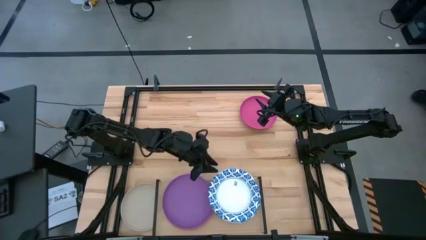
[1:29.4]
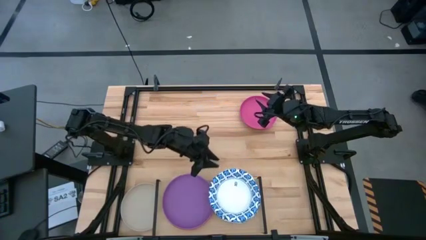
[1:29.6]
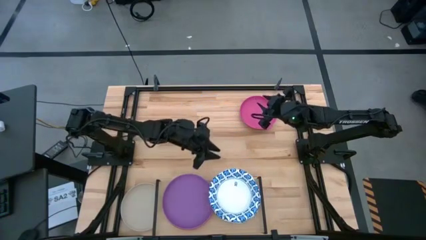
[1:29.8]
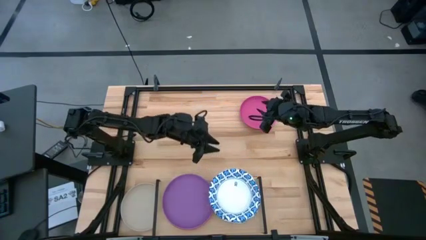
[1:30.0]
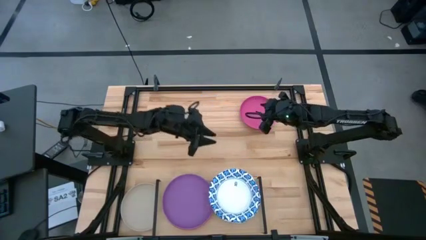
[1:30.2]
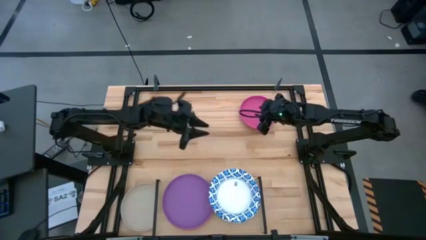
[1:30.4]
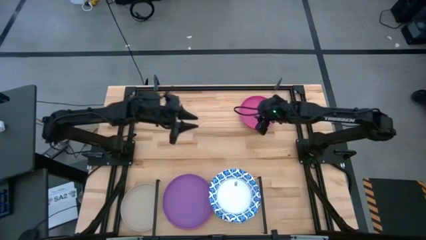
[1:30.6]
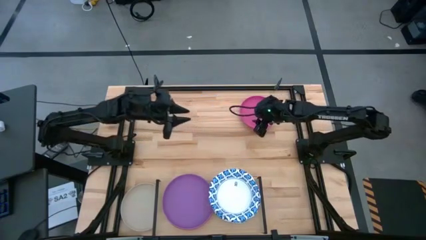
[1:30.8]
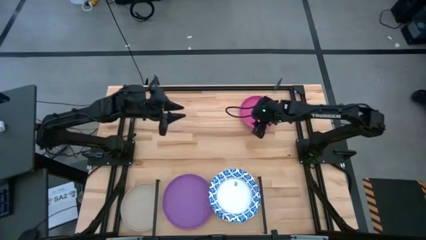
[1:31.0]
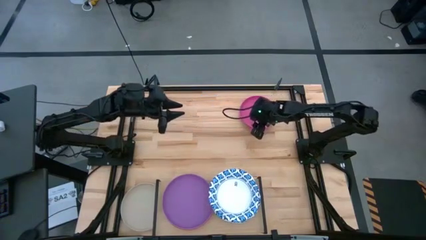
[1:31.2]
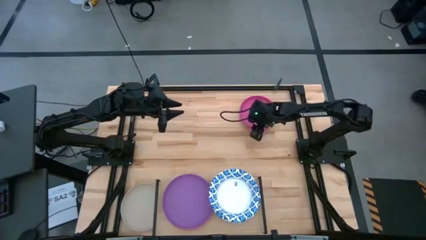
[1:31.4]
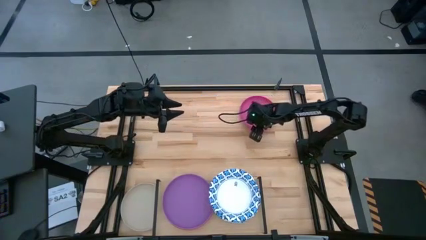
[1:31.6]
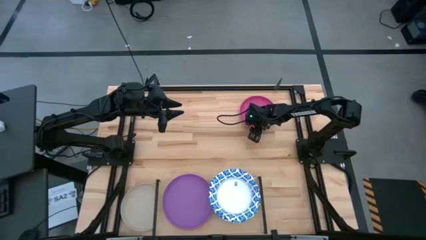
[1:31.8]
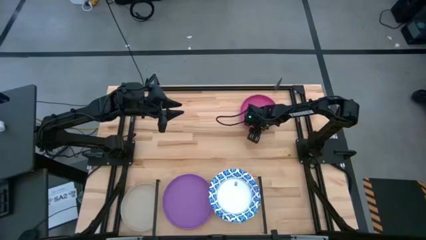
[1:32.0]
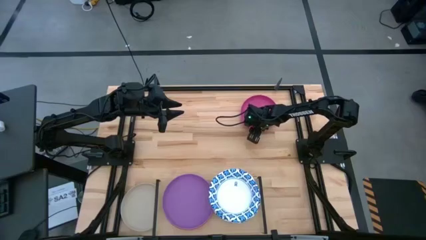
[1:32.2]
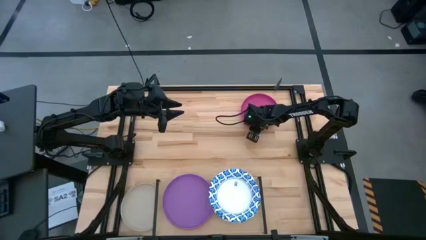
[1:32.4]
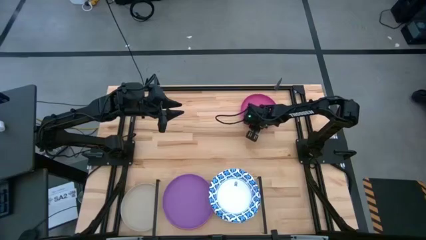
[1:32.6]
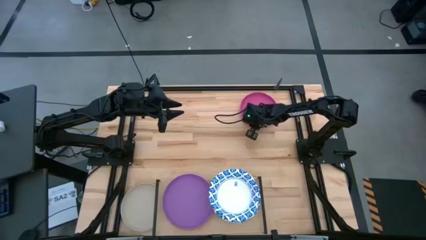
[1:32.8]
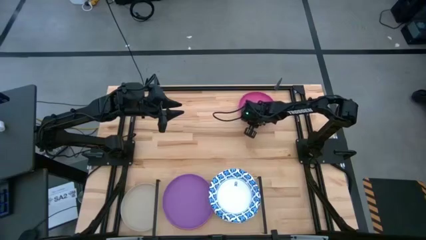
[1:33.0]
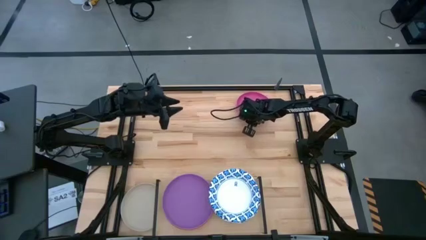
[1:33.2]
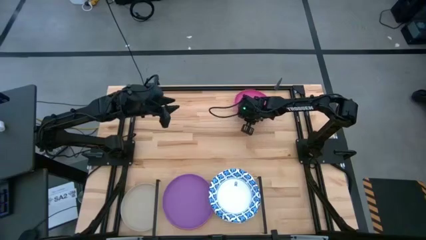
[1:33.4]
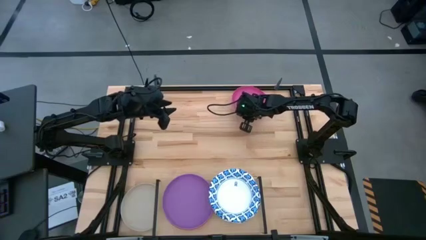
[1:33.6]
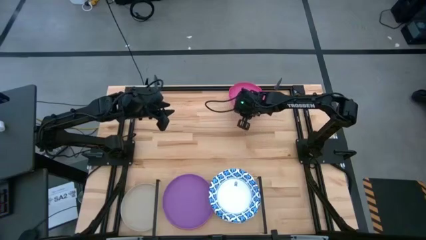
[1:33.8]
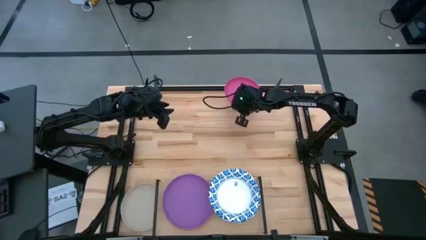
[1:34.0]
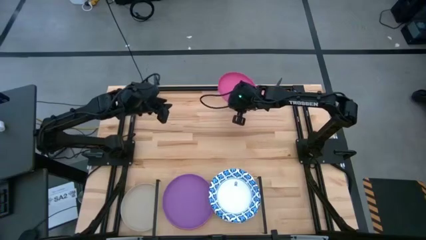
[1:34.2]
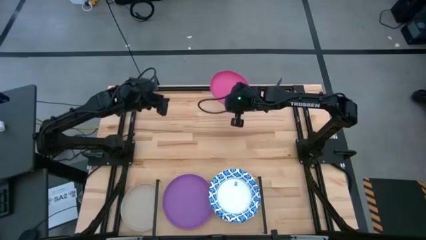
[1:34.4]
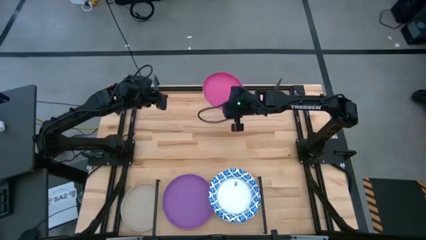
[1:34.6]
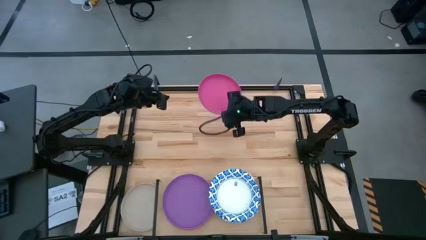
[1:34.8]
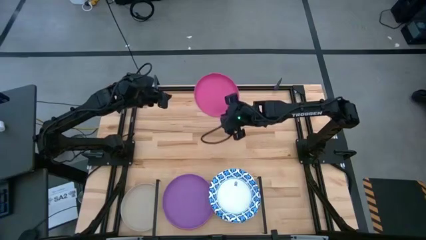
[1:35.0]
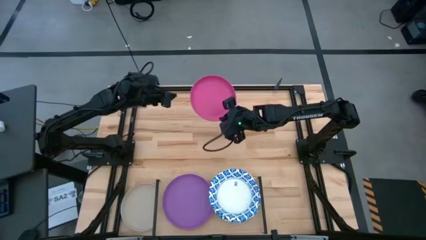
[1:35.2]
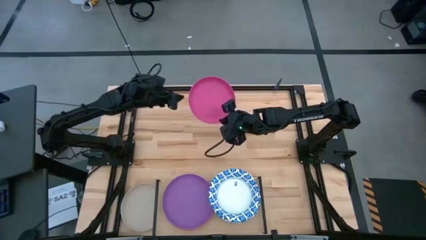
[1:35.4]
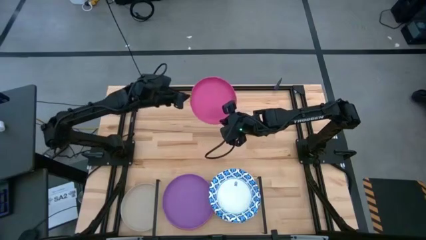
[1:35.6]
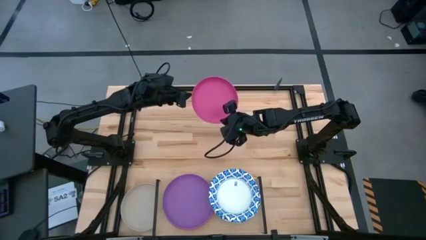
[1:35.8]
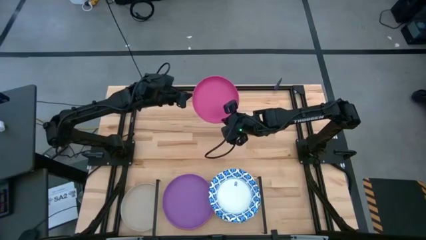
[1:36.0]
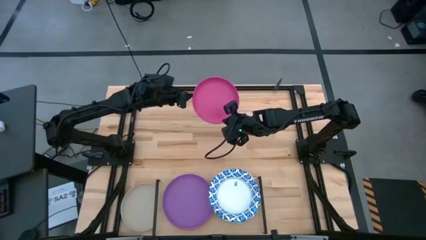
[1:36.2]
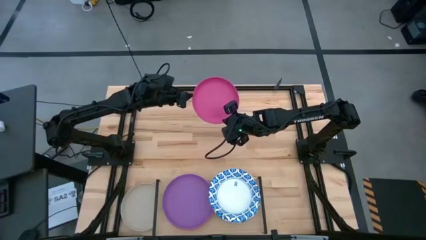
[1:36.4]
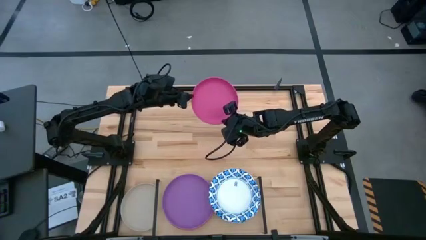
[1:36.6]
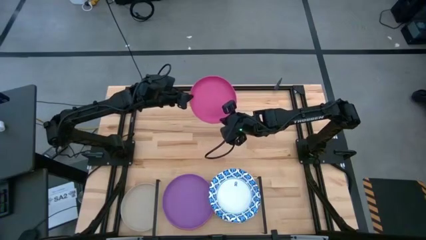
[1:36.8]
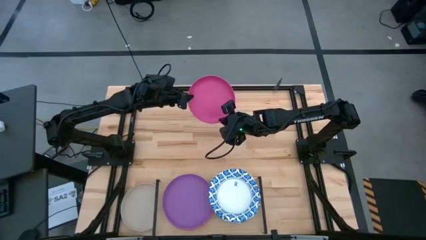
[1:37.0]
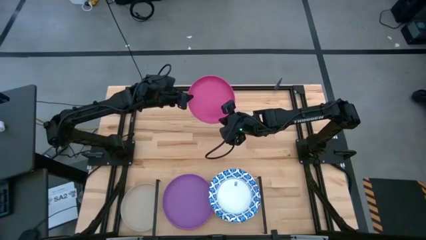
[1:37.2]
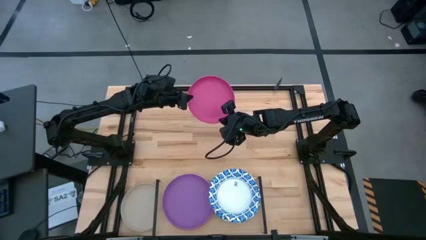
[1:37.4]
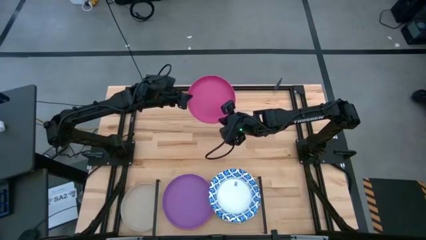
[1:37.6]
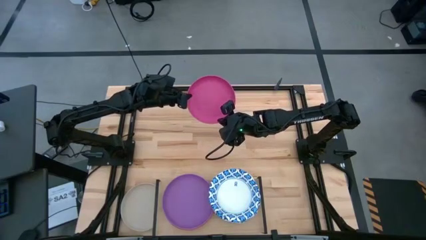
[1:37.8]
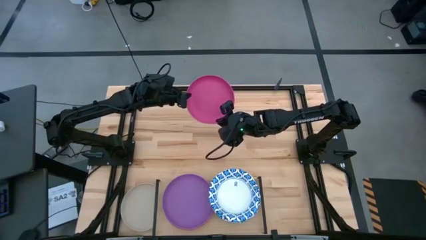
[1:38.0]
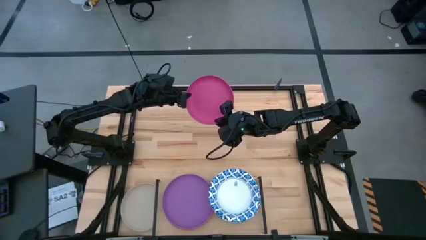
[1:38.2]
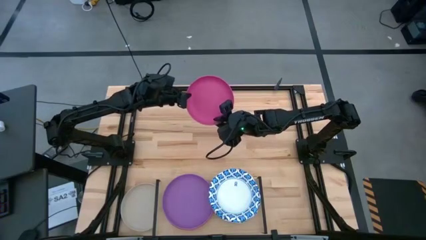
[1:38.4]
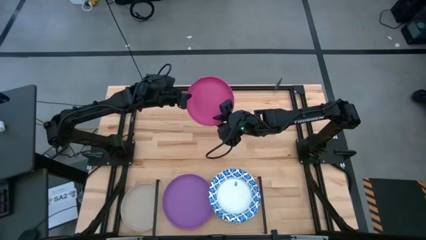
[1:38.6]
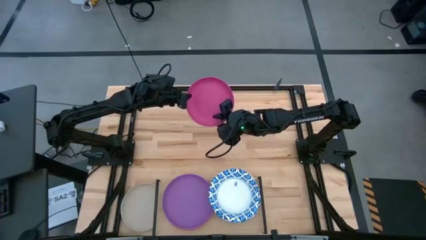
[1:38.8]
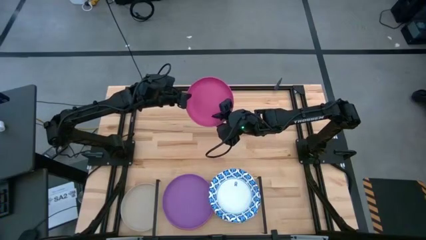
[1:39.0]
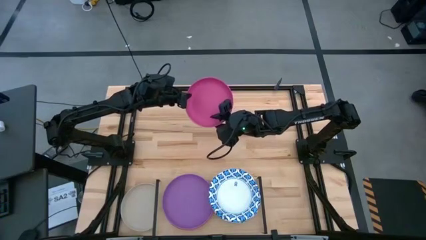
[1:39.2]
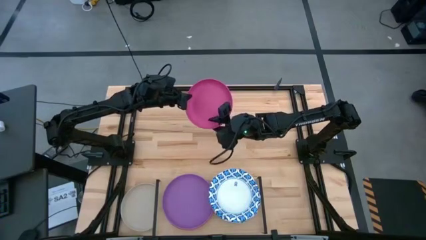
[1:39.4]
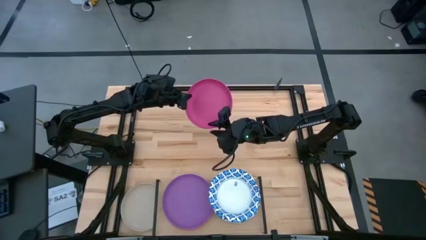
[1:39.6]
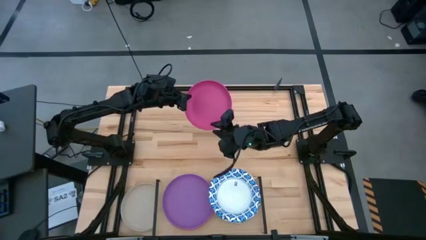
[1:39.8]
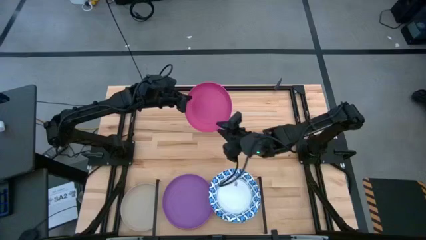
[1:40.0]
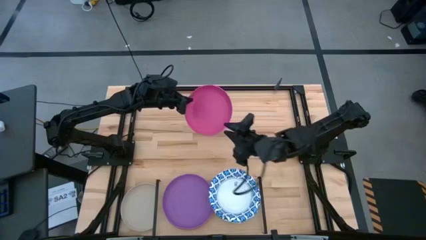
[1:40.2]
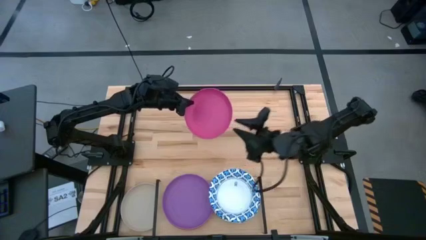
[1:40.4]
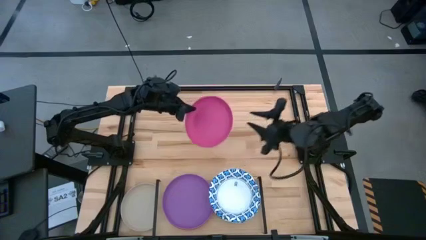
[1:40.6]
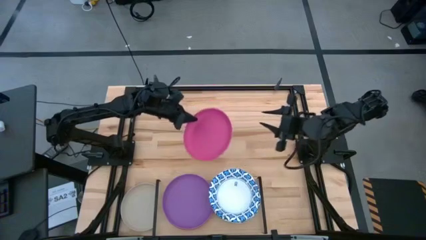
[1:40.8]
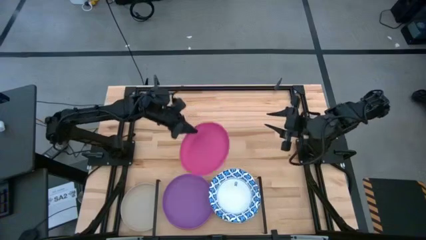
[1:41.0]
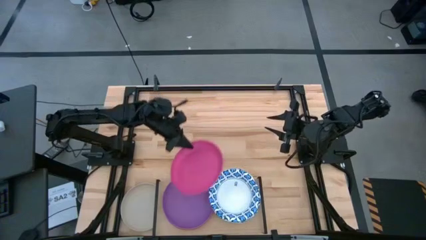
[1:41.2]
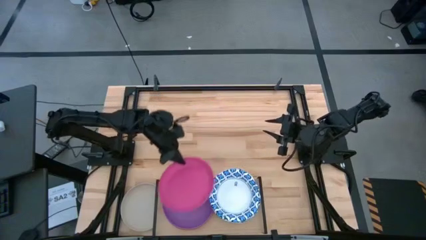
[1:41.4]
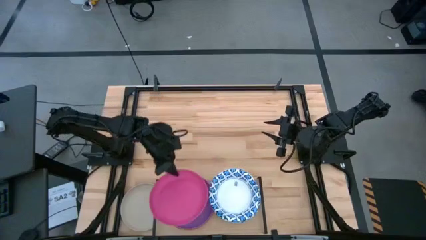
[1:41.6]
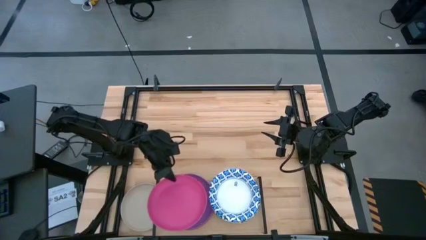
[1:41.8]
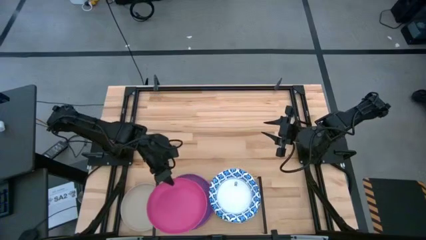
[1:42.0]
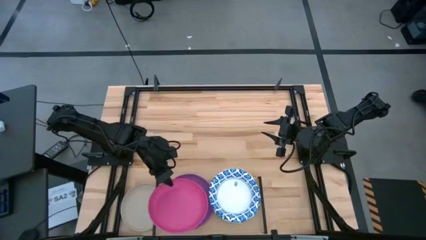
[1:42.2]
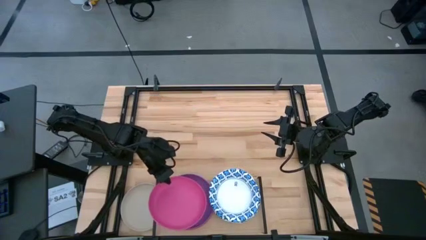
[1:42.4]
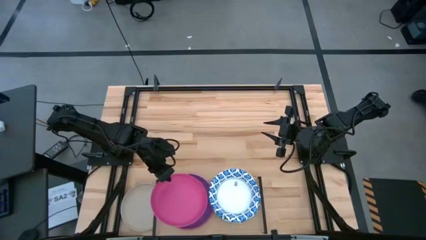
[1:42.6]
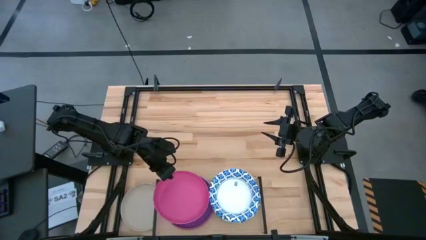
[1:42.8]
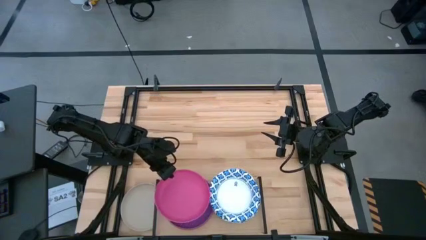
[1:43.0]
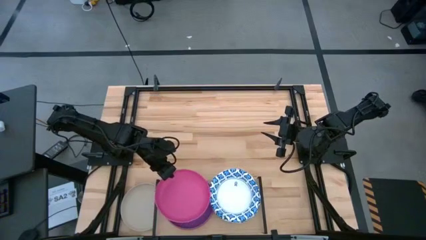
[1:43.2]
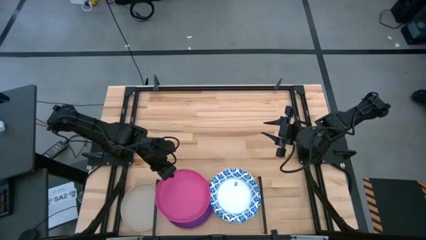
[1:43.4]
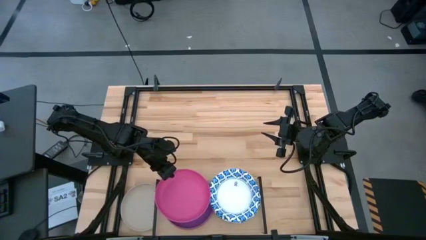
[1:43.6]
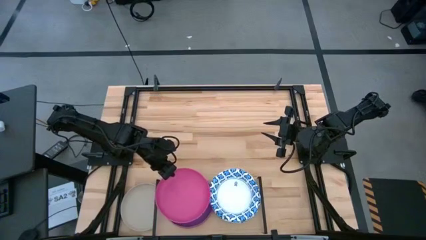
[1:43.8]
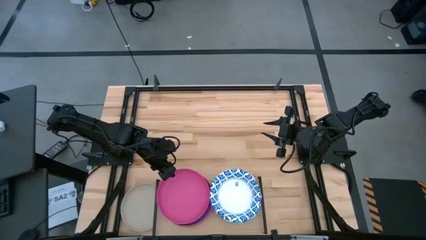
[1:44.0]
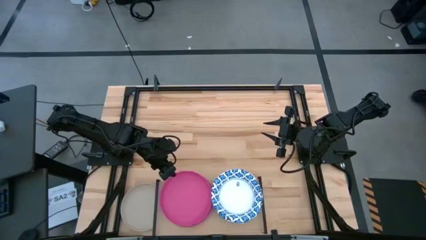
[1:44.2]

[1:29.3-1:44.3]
Task: Place and stack plates onto a shelf
Stack the pink plate on top of the purple plates on the shelf

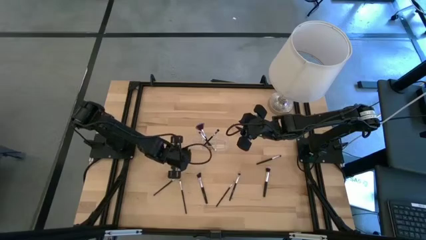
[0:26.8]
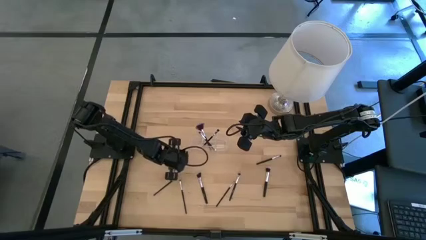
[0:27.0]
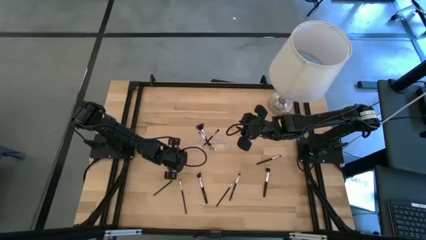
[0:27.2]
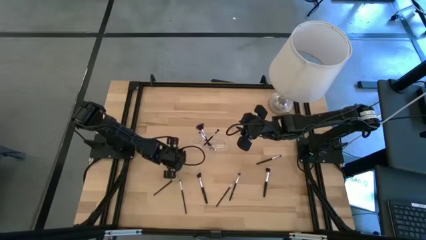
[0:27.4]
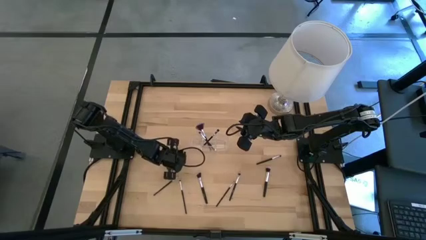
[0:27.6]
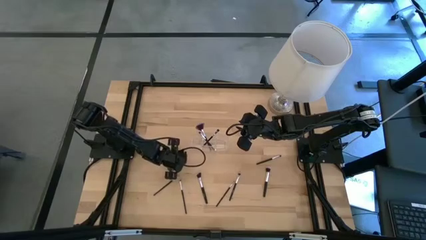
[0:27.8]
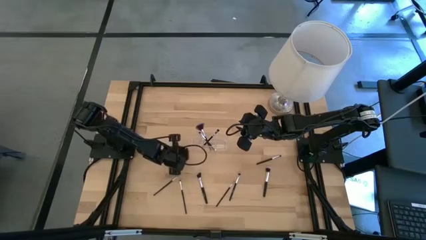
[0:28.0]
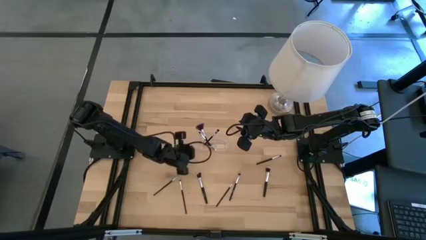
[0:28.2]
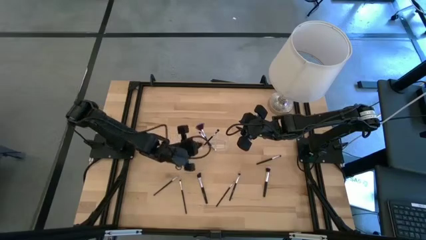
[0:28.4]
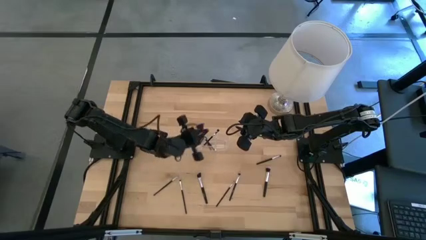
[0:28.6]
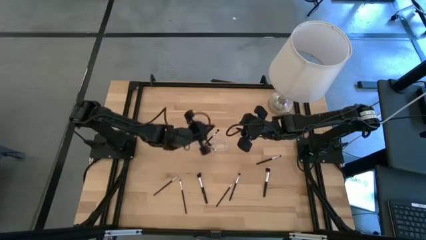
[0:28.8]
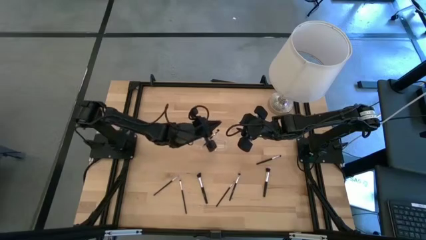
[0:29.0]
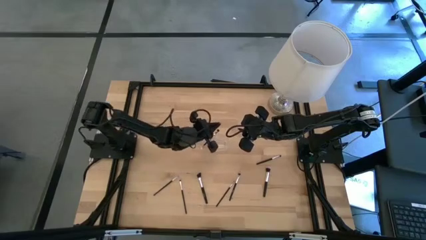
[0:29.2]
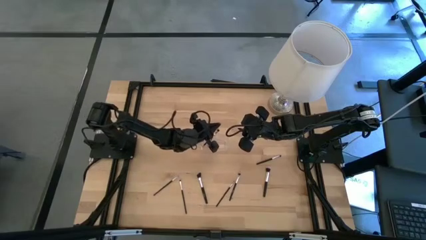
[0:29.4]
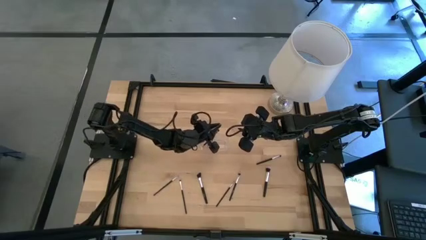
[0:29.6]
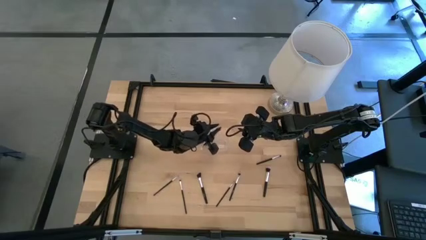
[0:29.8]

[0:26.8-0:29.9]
Task: Put items in baskets/containers
Put the blush brush into the transparent organizer
